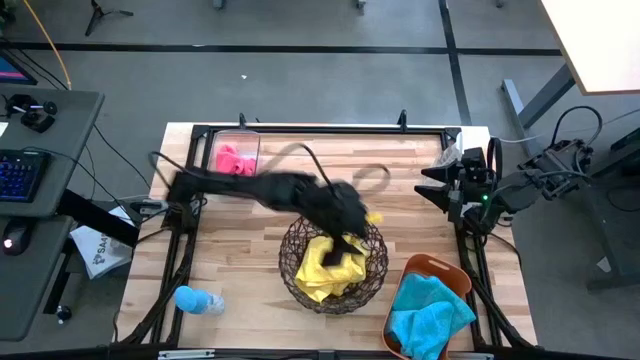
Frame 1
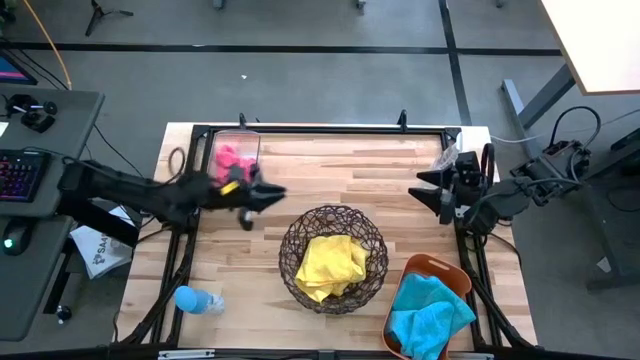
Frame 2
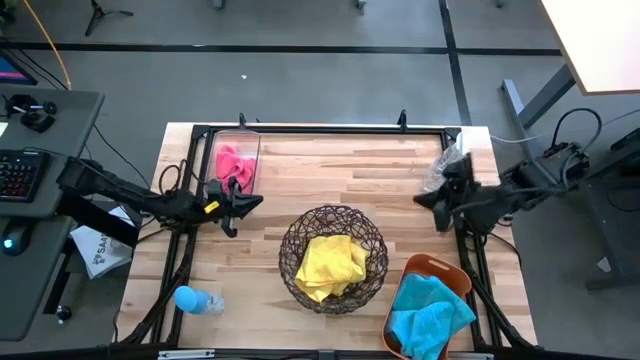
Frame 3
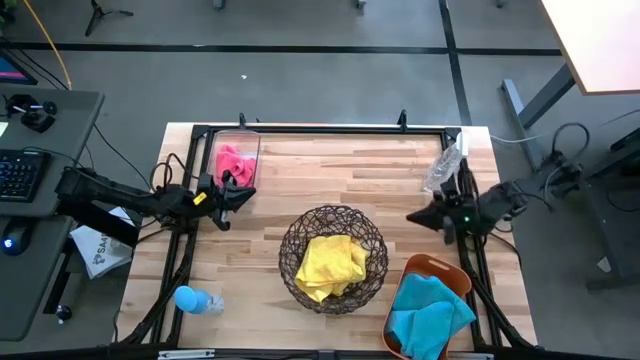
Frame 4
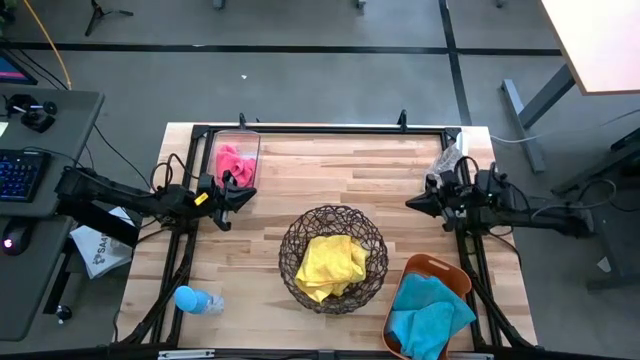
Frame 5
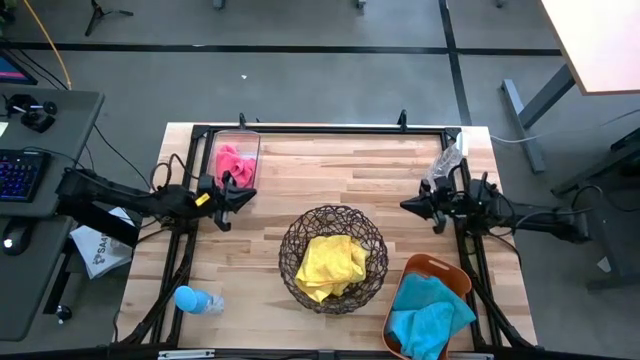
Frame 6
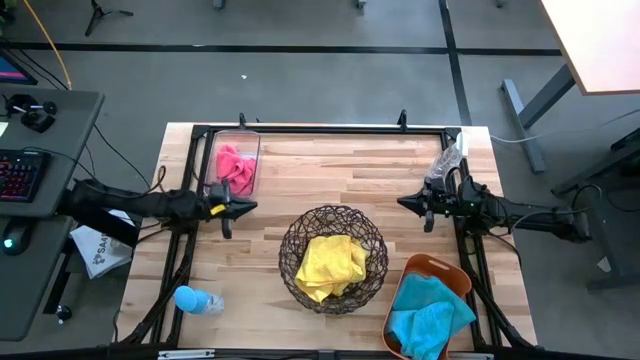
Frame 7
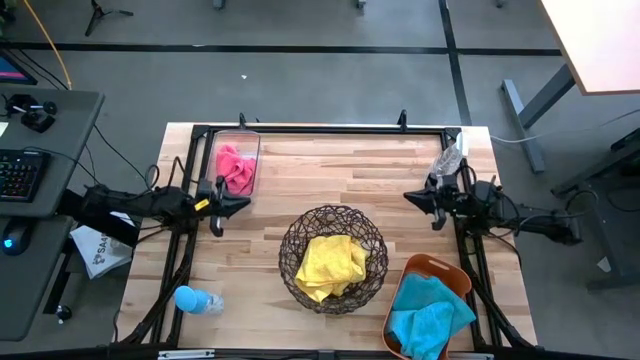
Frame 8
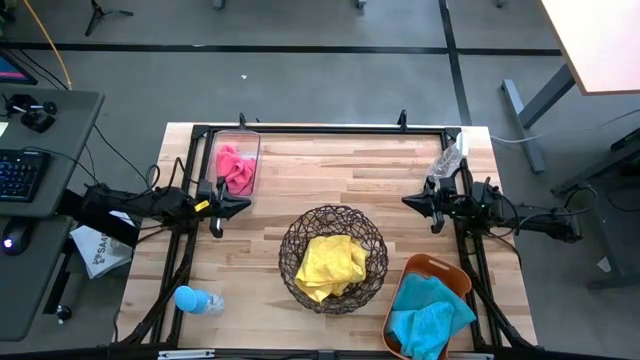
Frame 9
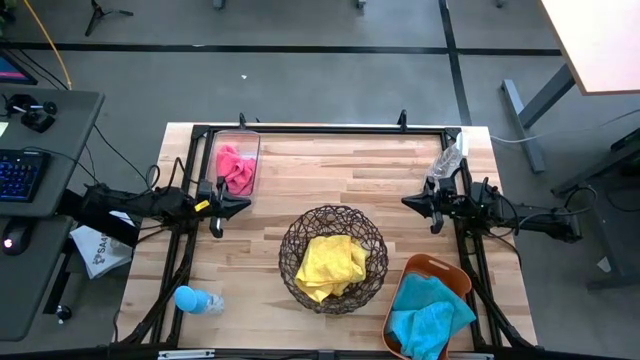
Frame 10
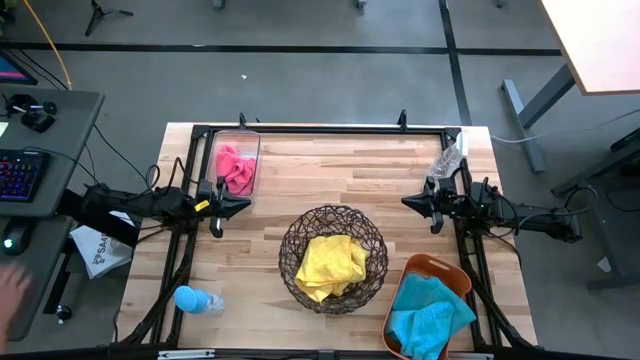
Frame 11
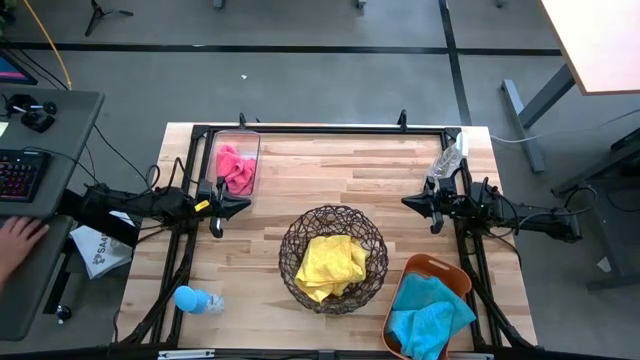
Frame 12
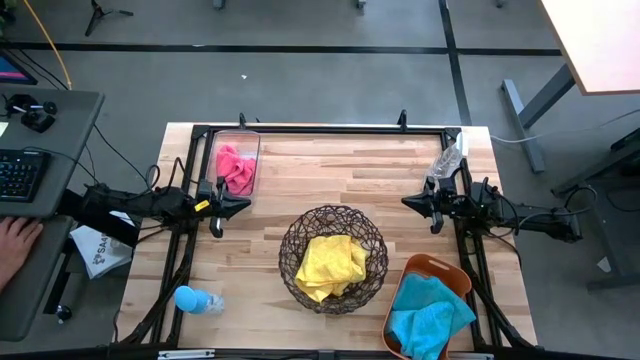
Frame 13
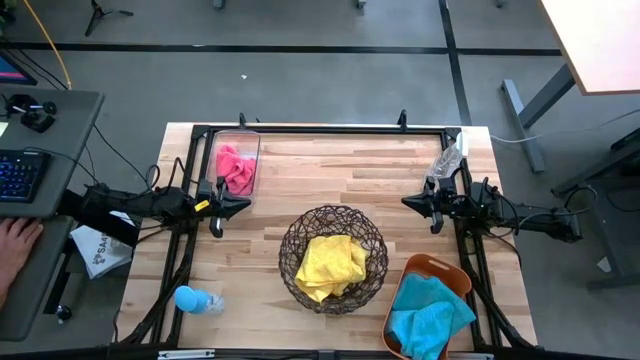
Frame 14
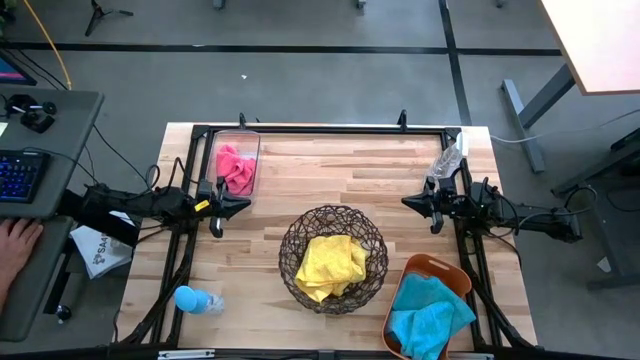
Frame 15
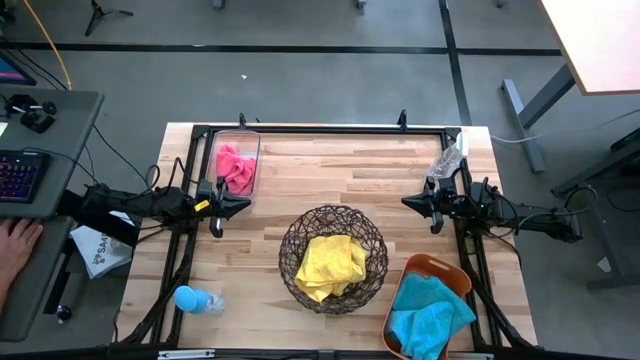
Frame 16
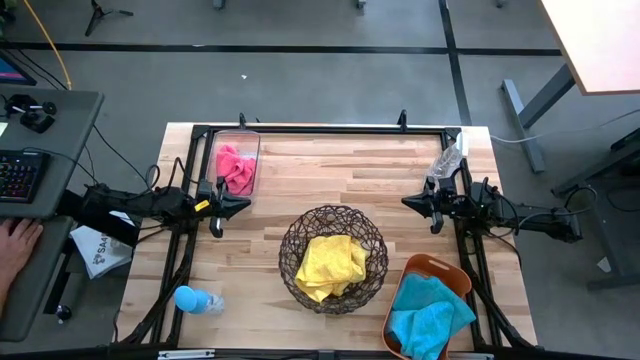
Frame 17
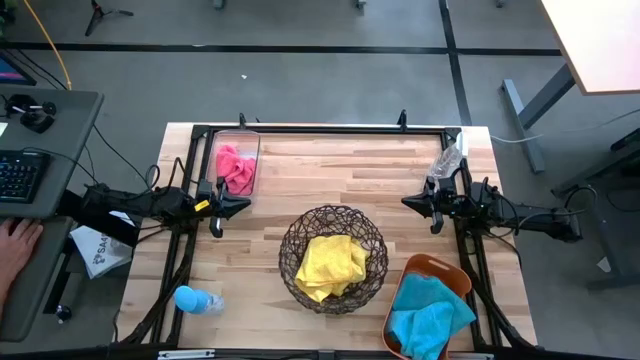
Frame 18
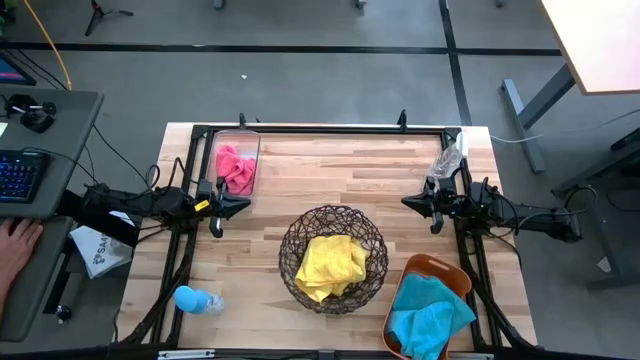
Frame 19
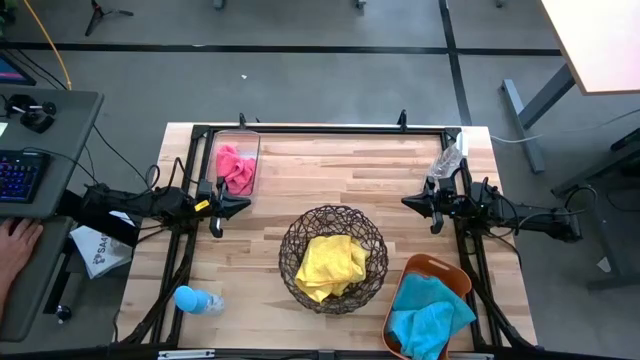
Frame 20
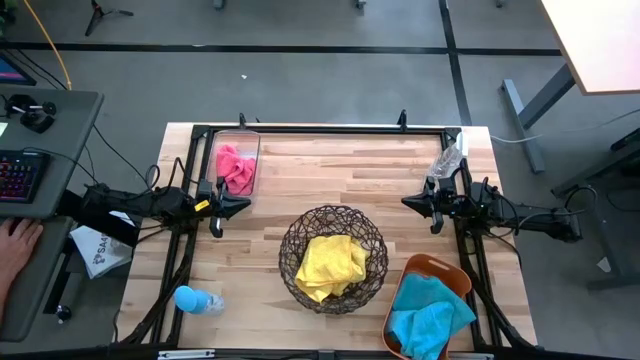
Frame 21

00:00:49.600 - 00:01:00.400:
Task: Sort microfiber towel by color & place in baskets
Return to Home Position

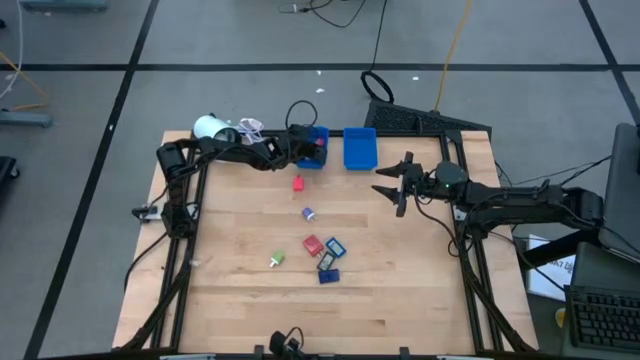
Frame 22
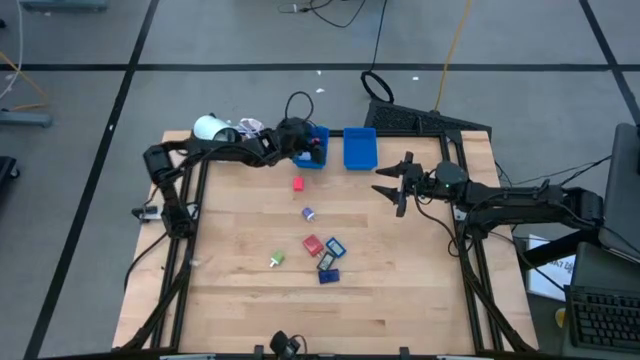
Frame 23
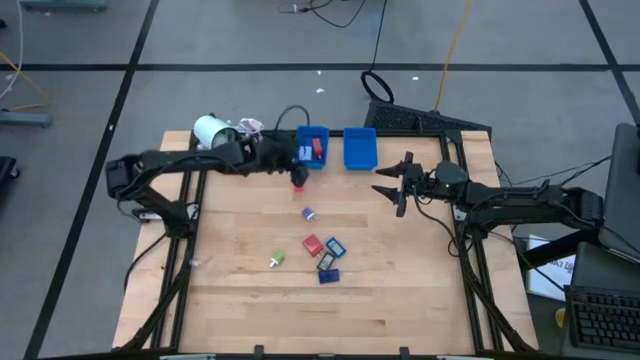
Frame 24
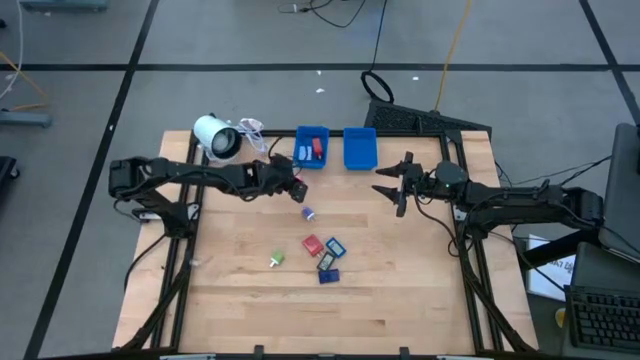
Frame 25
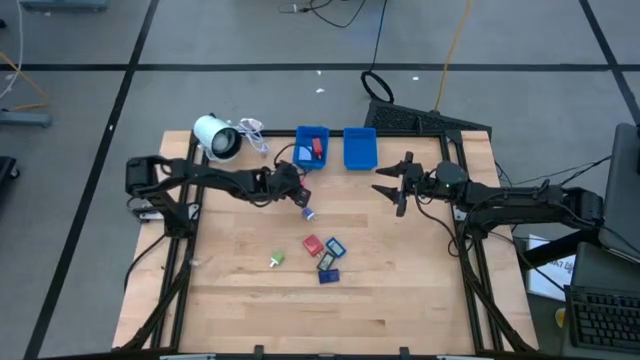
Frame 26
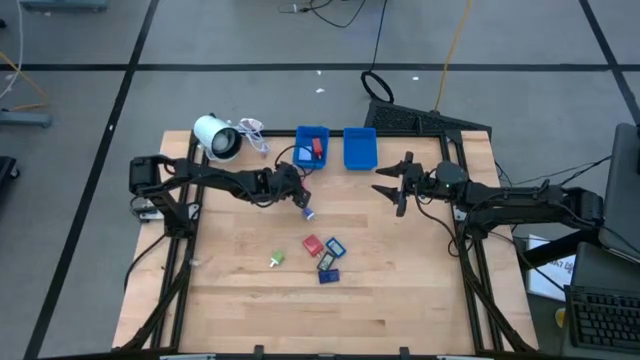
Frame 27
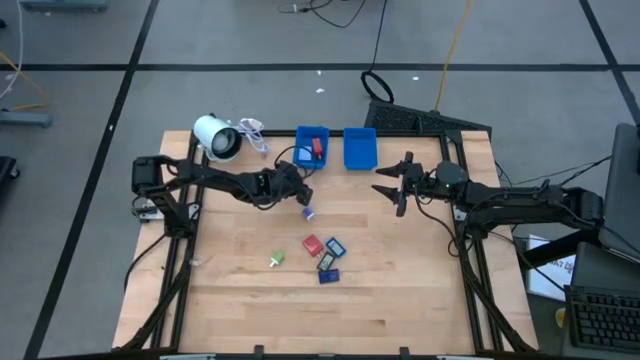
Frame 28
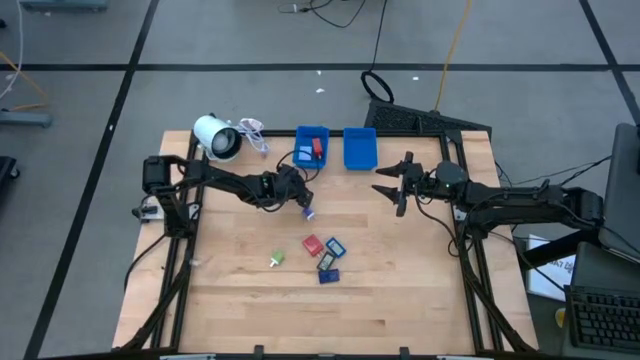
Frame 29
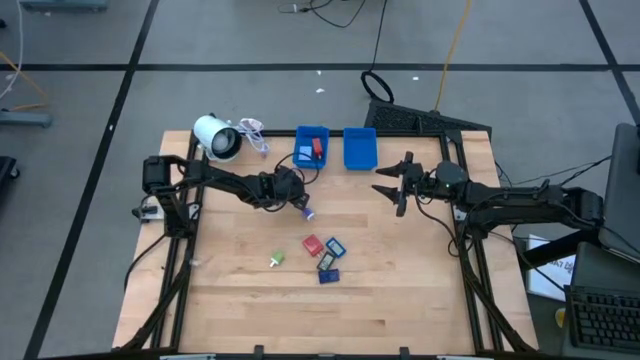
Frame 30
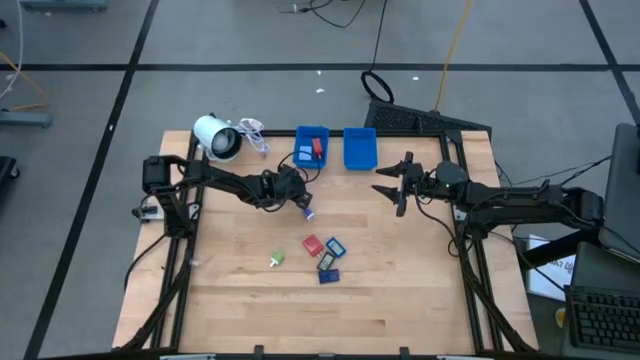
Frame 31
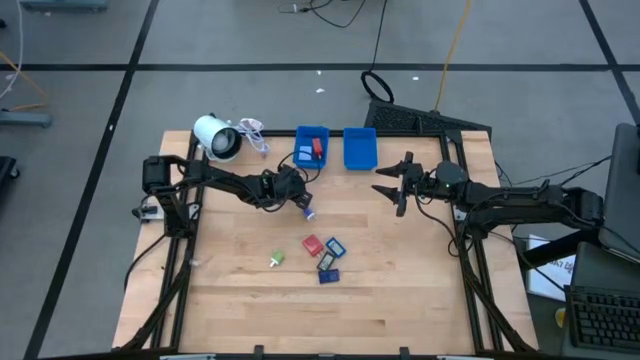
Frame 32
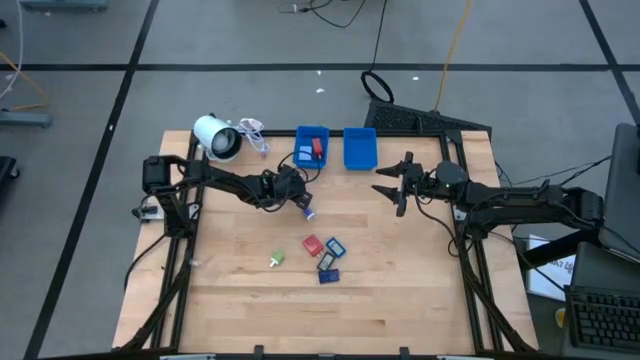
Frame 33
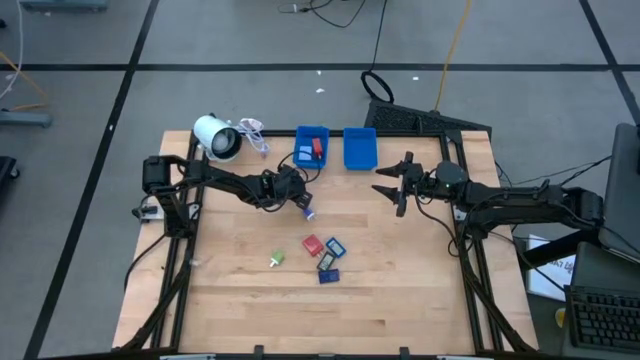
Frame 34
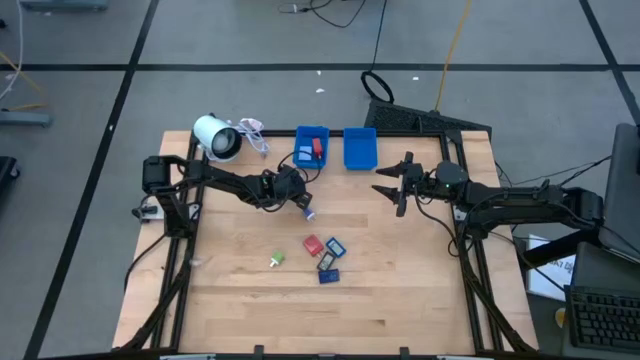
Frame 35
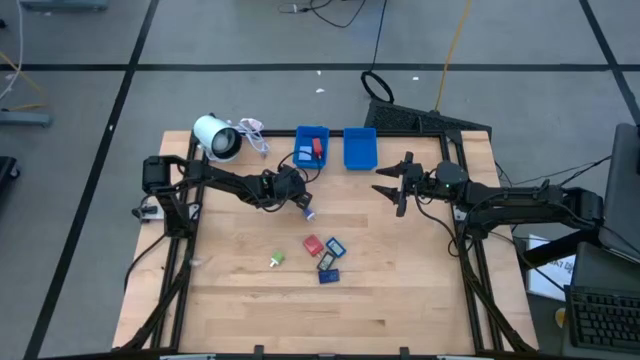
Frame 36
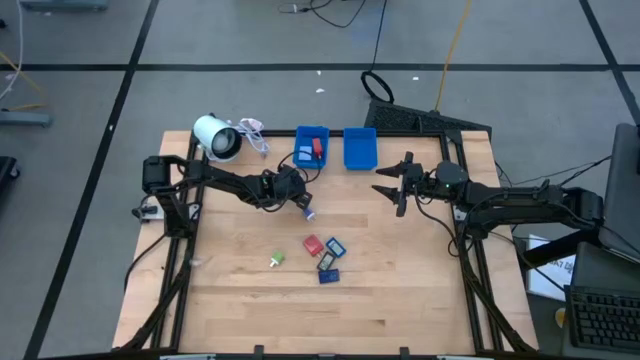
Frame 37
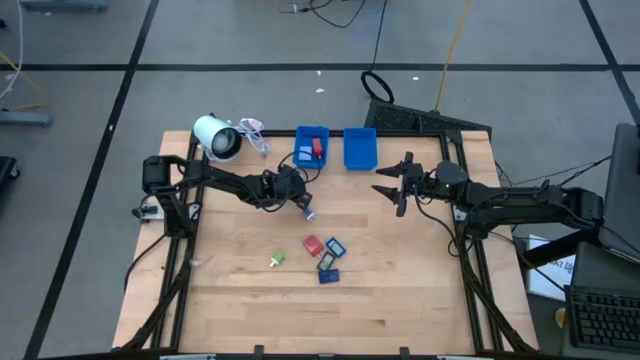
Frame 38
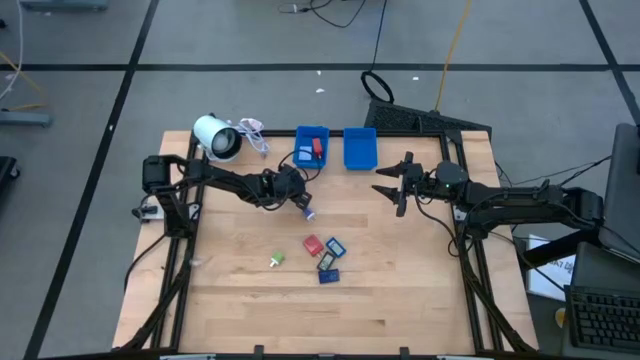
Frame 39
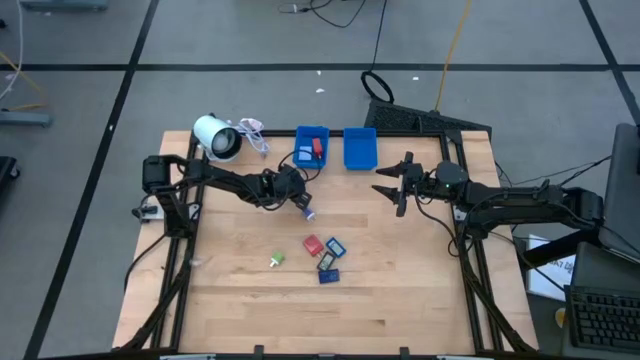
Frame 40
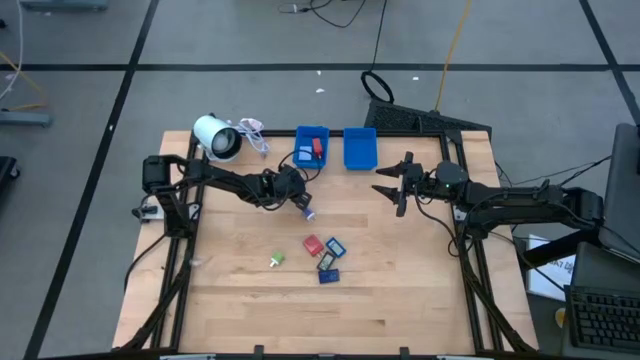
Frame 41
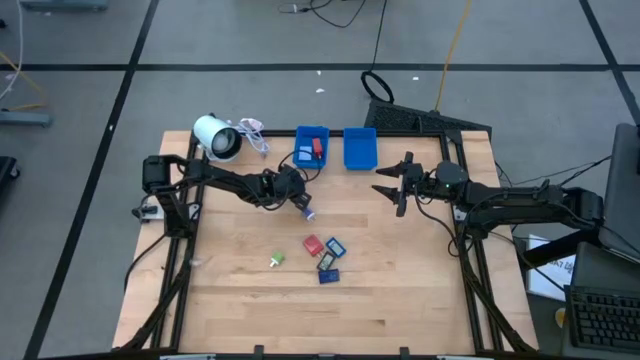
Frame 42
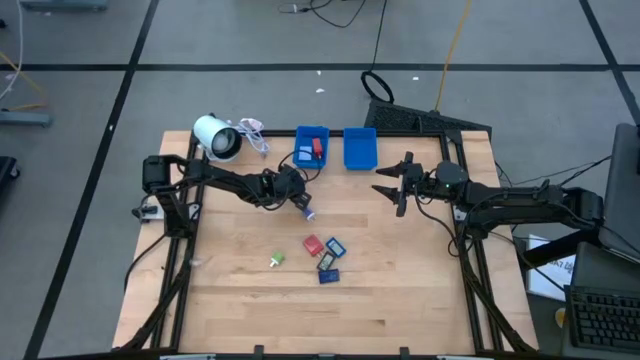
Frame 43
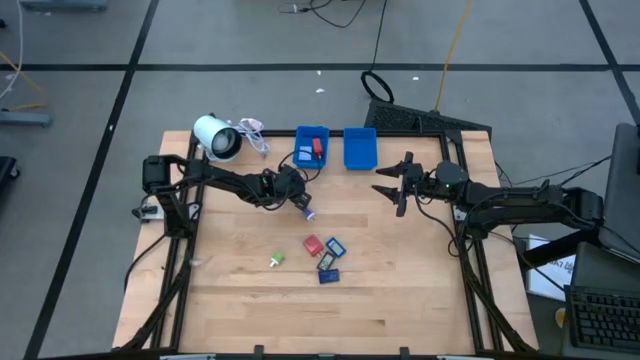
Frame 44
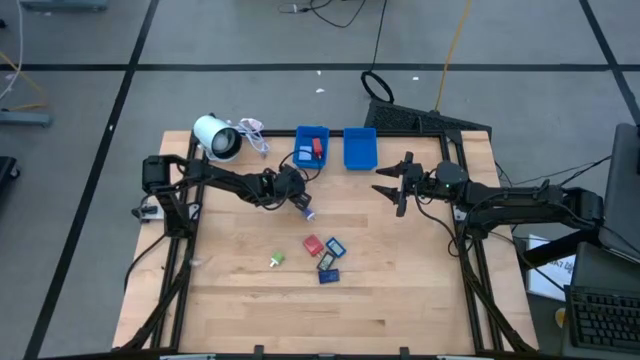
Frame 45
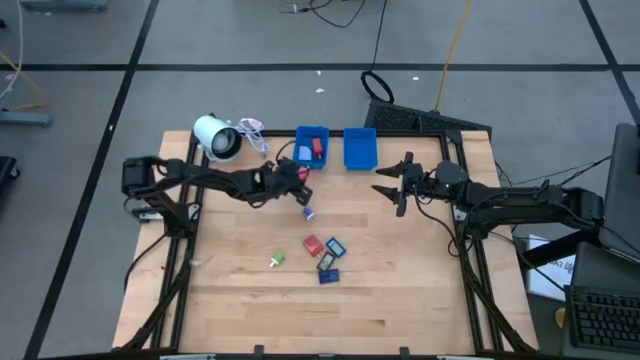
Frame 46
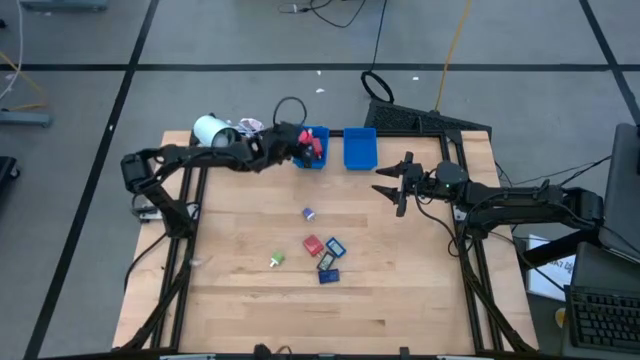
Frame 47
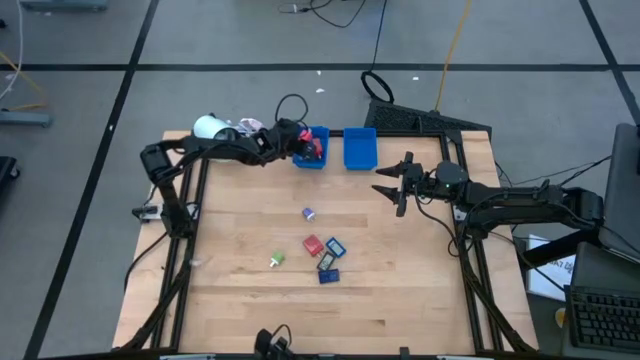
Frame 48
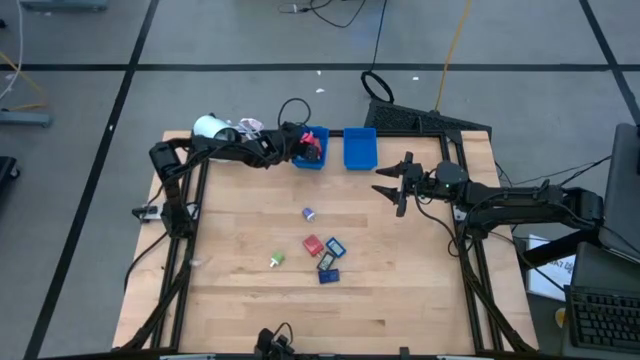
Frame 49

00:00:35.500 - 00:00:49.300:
Task: Pick & Place Office items
Put the pink charger adapter into the left basket
